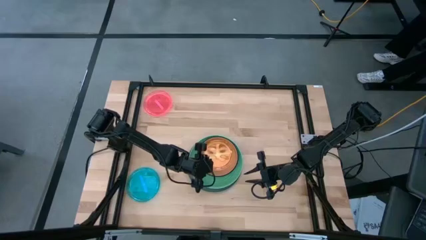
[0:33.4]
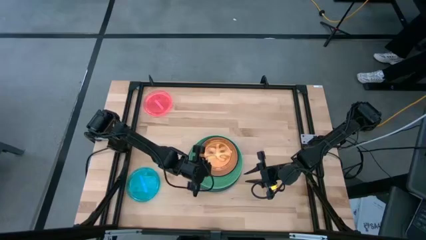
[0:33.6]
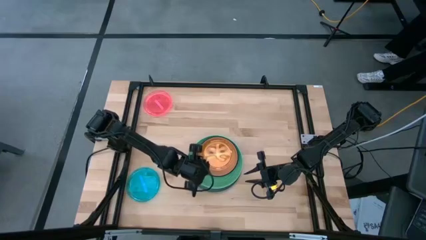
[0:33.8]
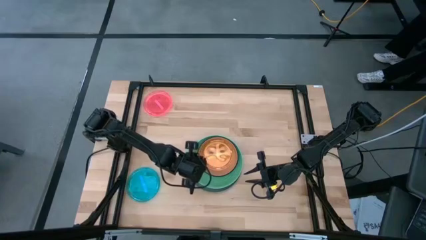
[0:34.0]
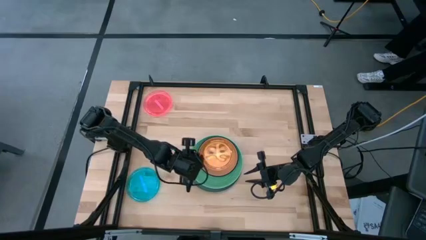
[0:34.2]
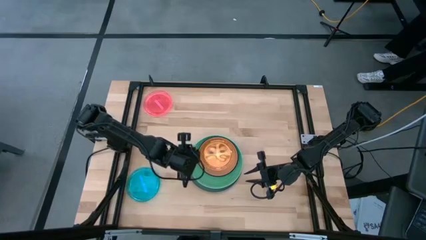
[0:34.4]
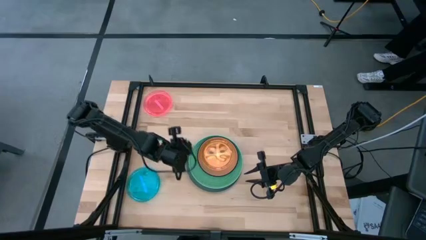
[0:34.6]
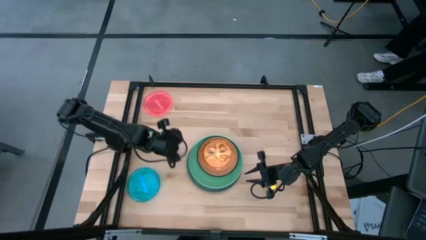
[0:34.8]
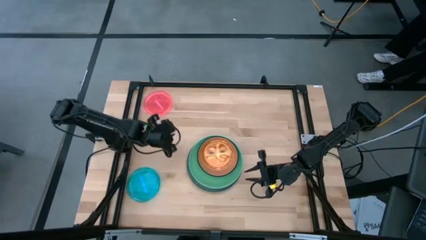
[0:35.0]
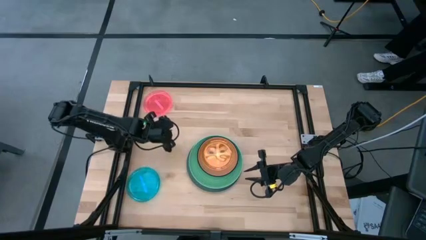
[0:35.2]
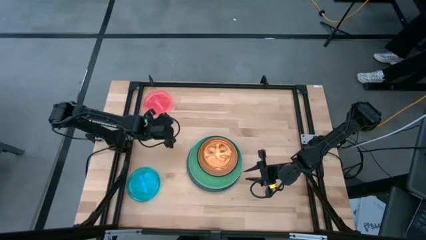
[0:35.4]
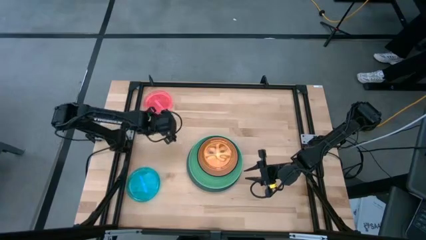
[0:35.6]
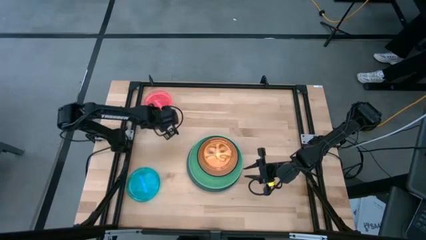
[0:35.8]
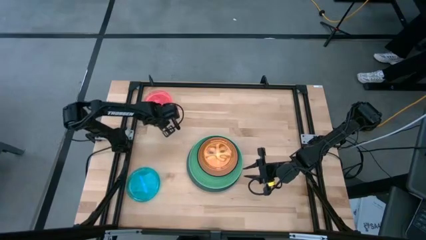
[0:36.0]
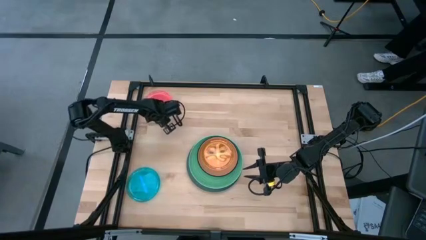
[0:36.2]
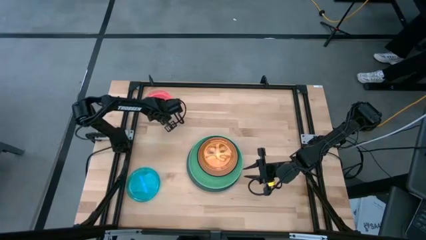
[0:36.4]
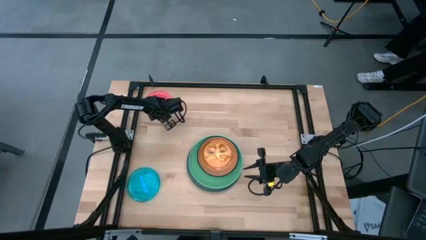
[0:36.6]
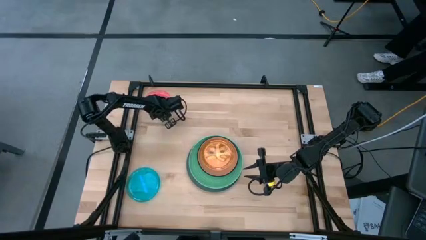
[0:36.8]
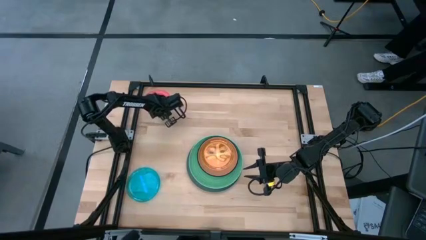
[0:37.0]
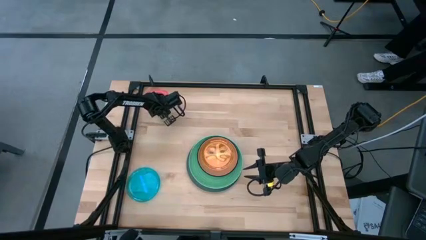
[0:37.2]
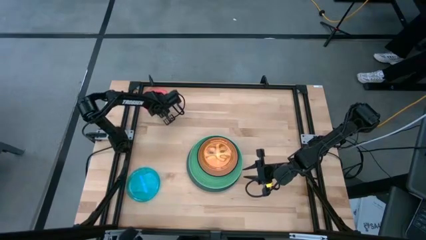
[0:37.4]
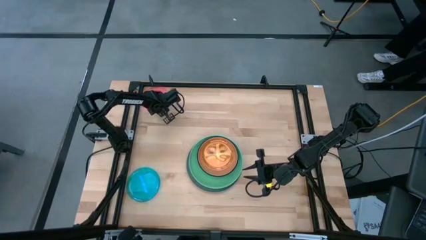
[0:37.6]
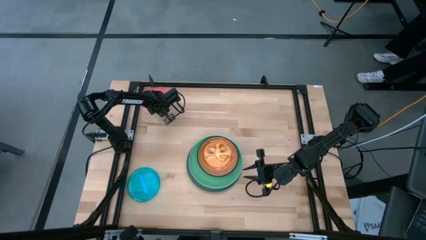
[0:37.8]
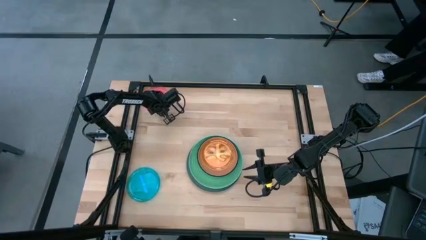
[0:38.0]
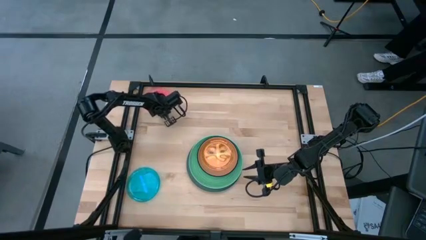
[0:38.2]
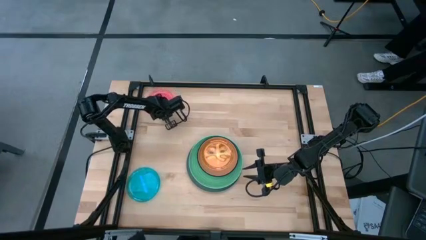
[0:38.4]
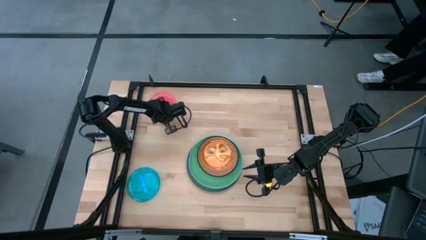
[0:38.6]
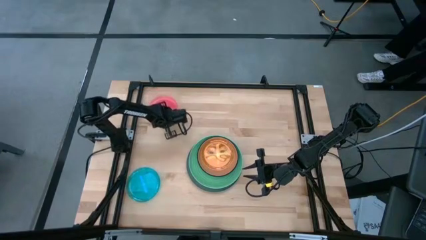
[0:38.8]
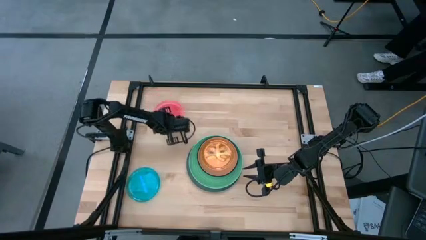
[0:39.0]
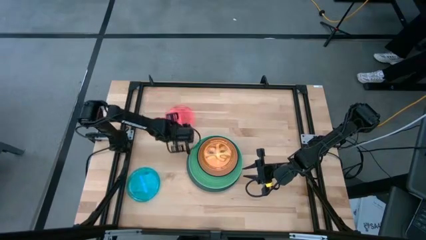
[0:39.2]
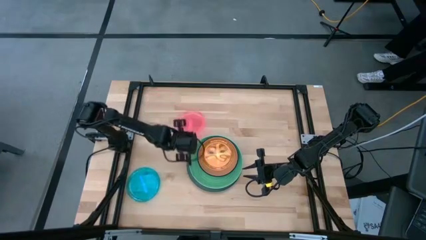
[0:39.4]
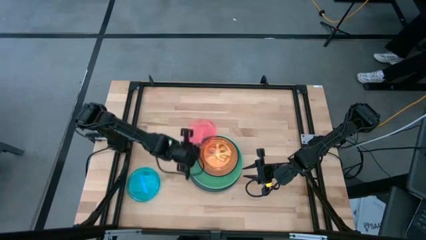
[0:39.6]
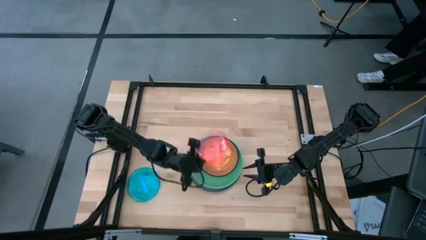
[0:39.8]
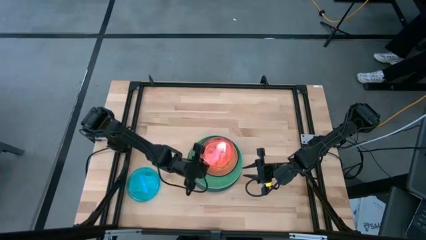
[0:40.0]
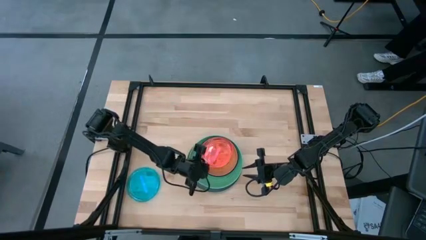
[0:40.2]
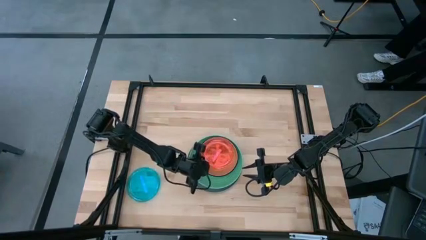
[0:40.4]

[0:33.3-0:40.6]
Task: Stack plastic plates
Stack the pink plate on top of the orange plate

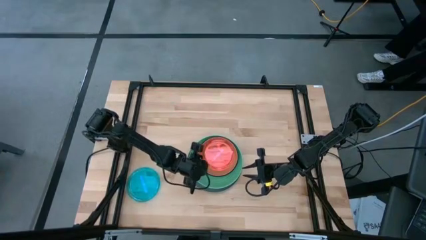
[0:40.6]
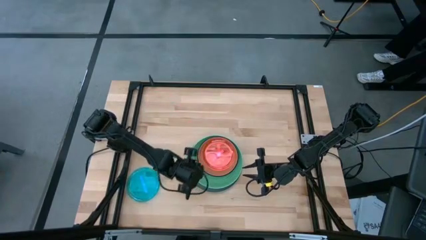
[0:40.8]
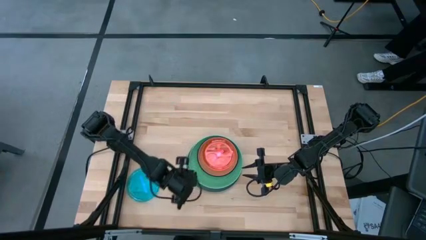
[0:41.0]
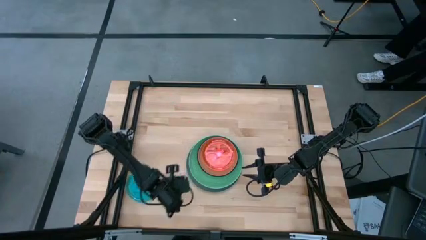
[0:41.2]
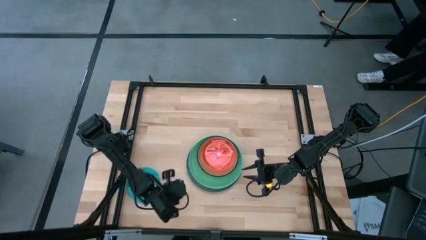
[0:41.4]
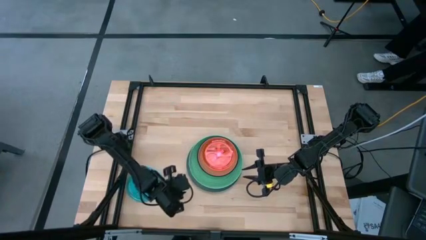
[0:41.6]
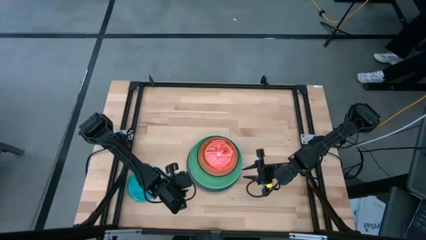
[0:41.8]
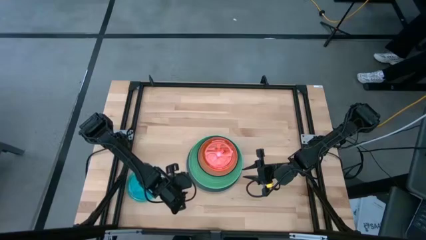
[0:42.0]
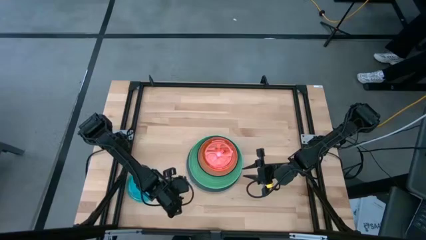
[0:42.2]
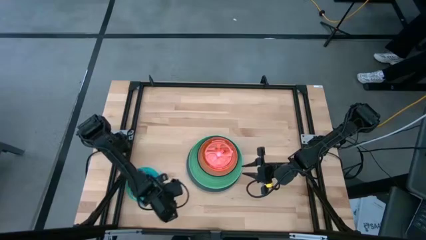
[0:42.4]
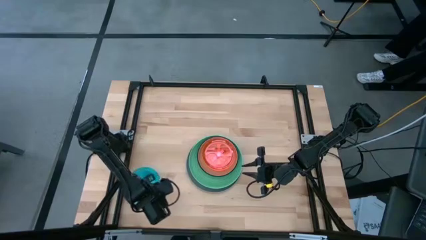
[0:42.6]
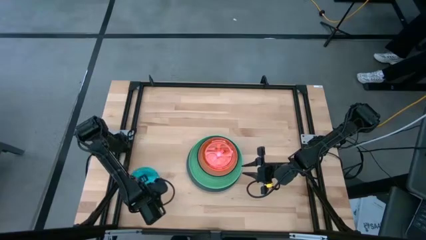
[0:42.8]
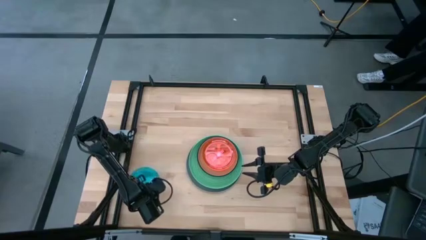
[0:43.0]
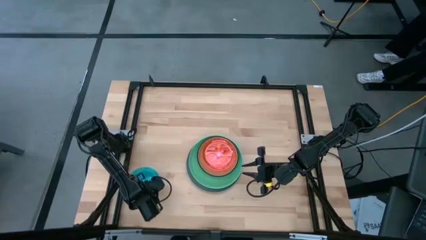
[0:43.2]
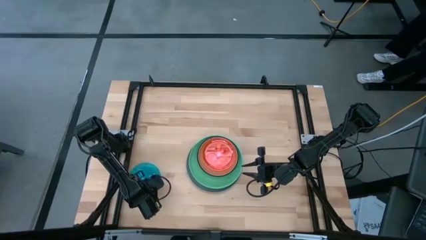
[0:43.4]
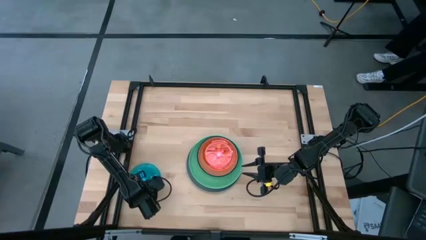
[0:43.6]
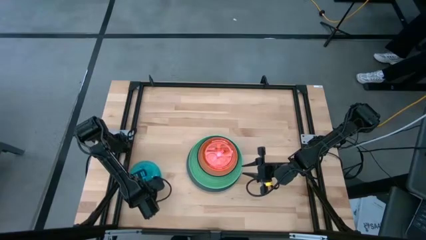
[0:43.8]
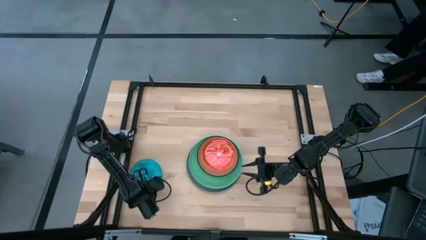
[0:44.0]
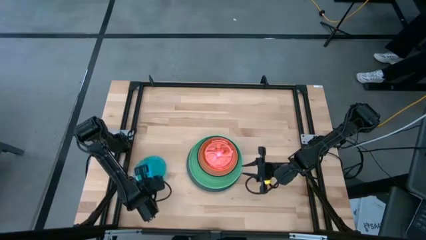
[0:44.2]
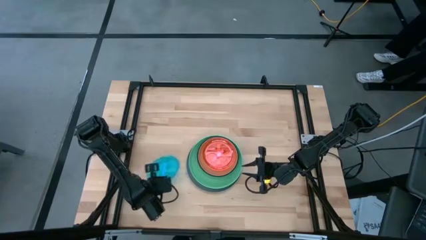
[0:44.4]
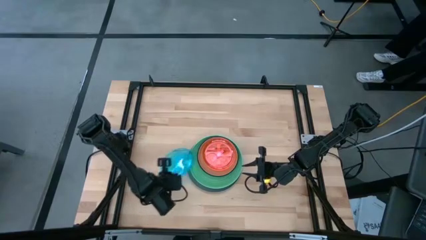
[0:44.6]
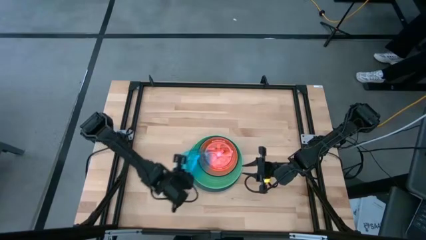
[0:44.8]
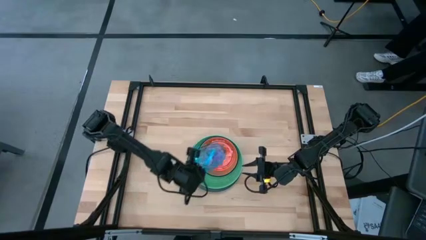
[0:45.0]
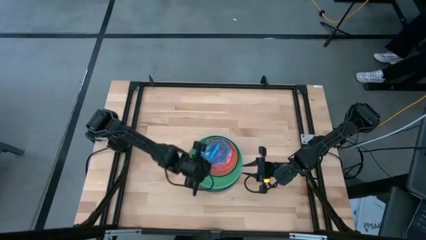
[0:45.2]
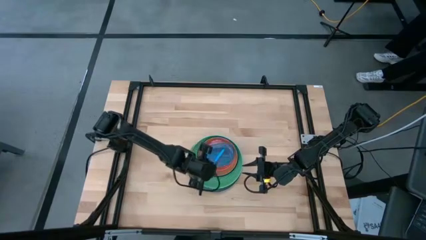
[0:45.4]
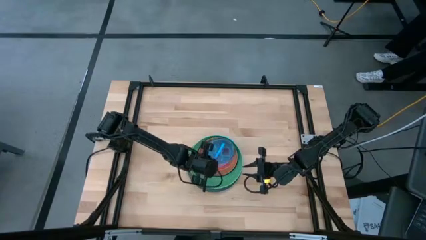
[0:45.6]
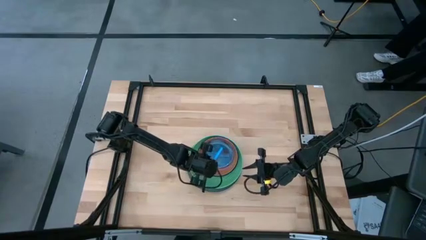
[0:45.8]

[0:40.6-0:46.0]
Stack the blue plate on top of the pink plate

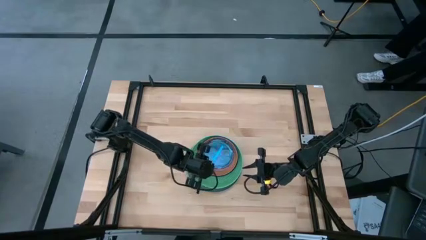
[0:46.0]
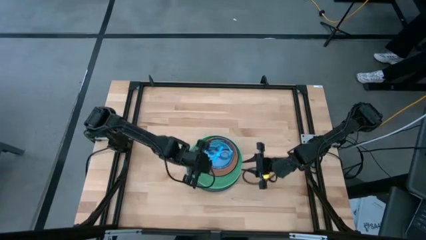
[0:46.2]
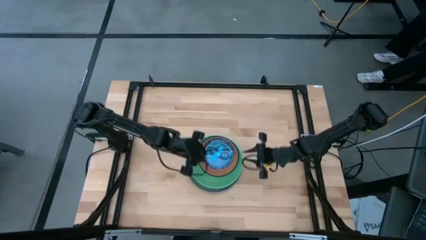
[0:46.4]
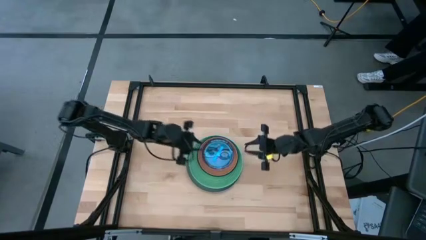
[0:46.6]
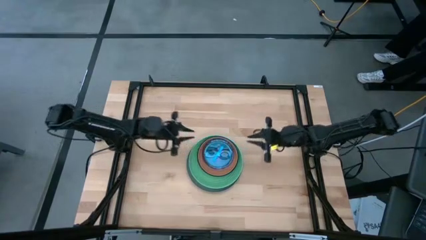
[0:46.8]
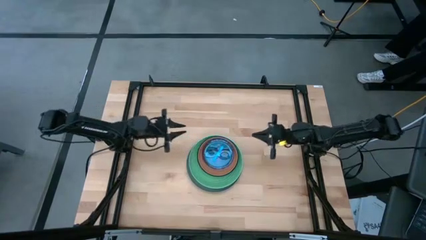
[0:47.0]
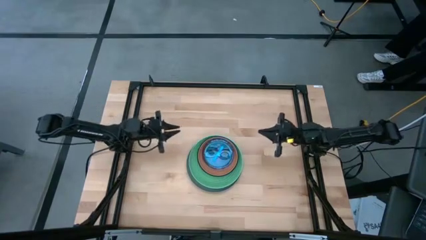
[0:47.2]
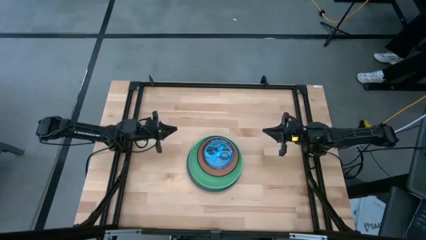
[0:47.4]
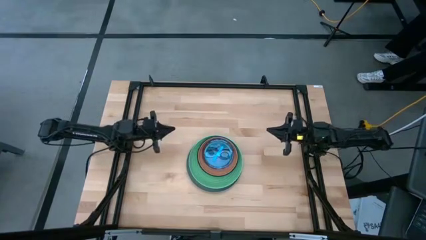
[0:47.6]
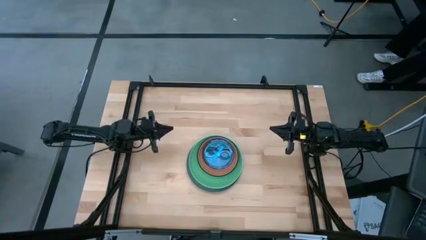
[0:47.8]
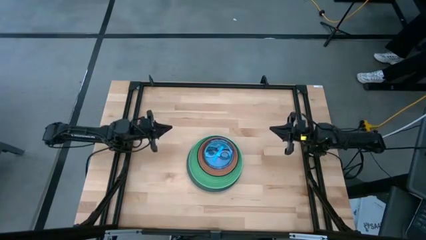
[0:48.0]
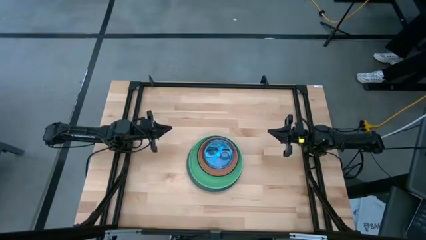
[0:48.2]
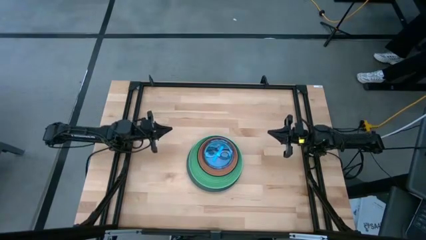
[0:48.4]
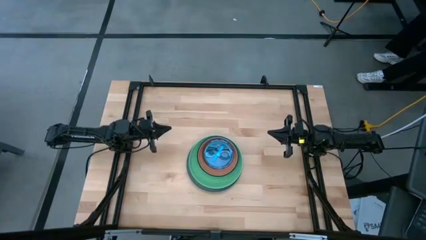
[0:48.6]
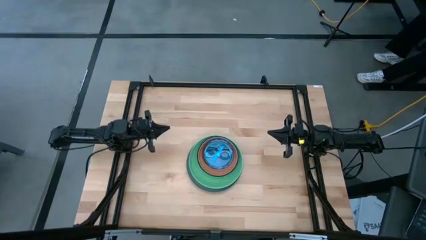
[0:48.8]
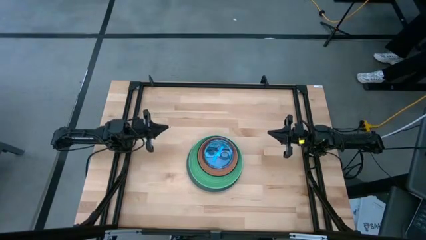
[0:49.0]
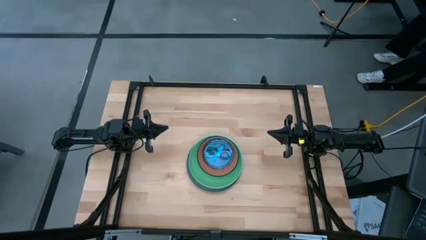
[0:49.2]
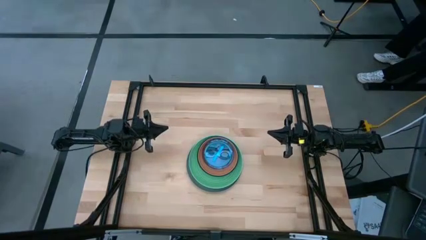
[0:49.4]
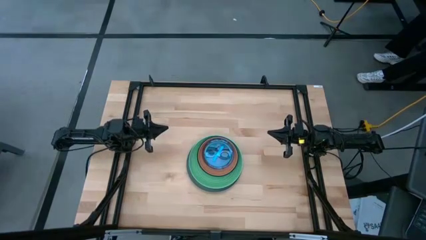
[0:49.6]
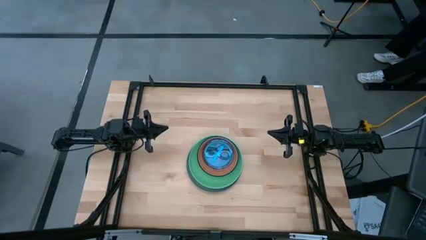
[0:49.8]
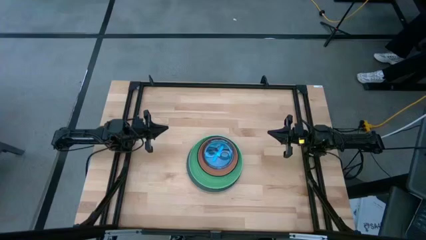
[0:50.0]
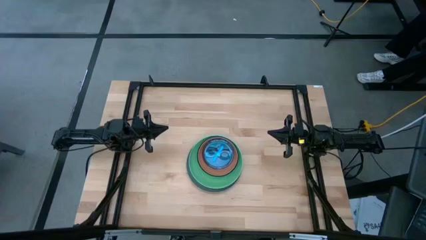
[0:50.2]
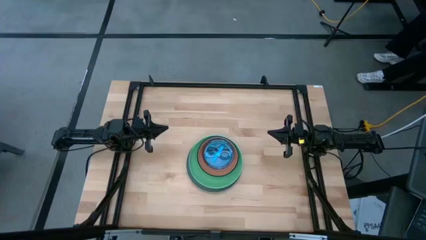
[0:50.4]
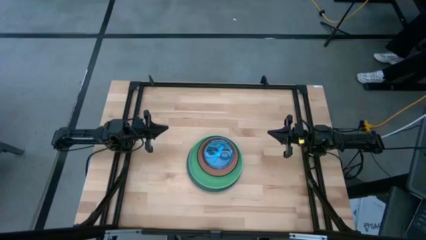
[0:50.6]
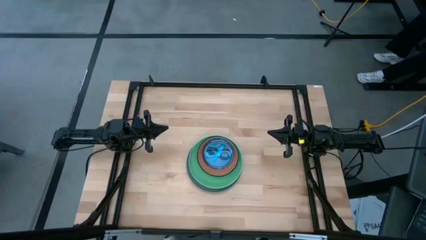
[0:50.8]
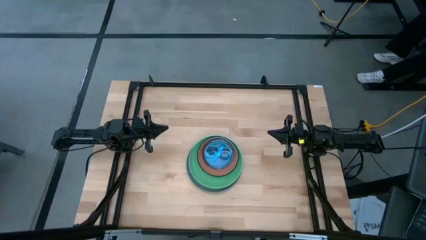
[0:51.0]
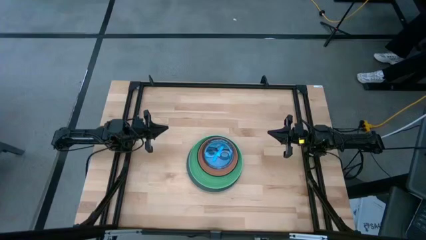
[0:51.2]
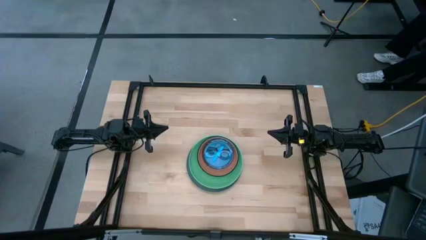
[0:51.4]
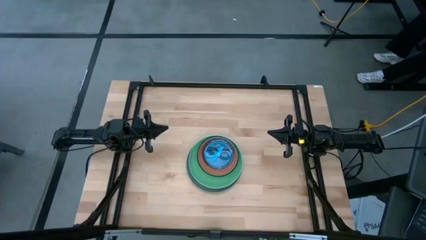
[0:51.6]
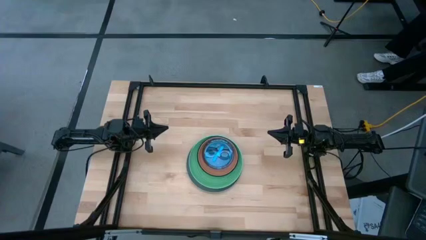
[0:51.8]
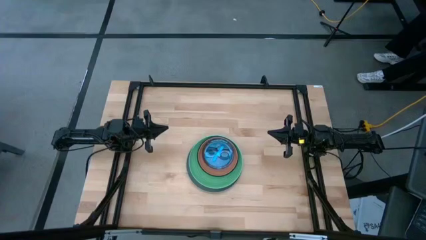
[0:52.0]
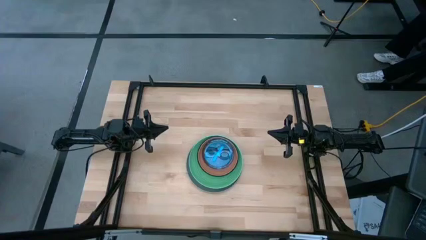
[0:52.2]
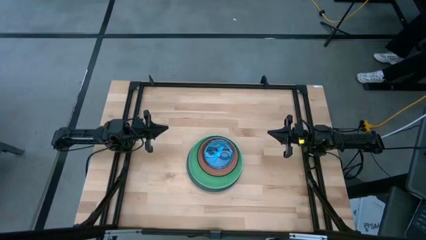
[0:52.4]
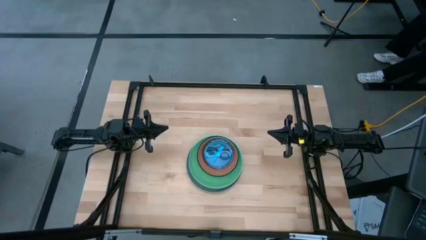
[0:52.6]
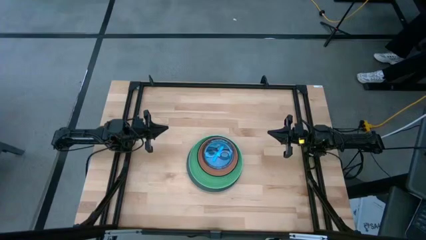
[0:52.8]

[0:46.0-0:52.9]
Return to Home Position
